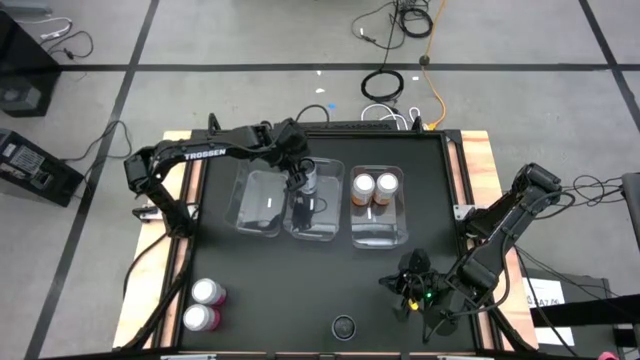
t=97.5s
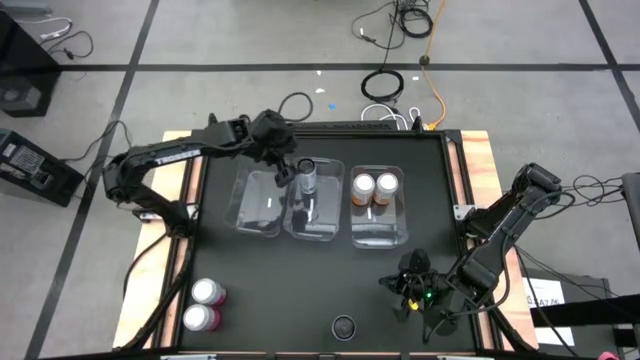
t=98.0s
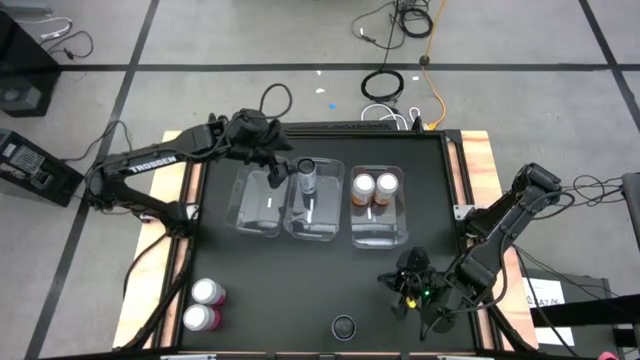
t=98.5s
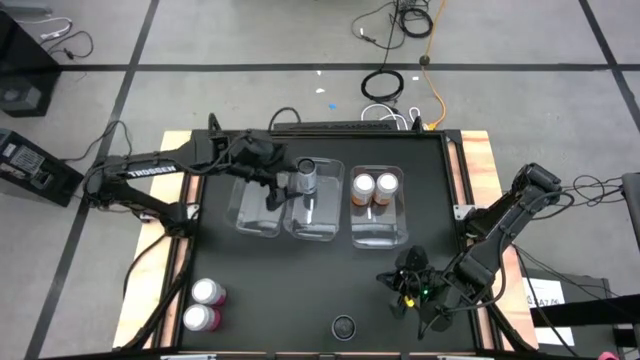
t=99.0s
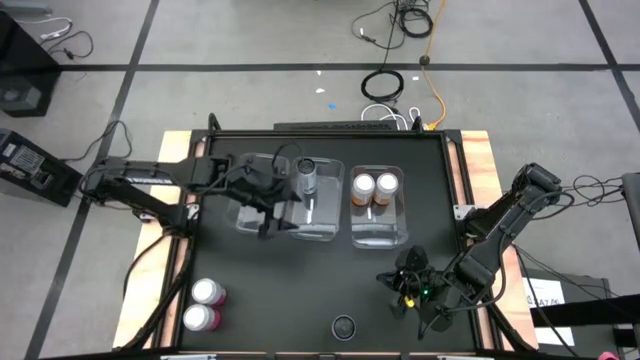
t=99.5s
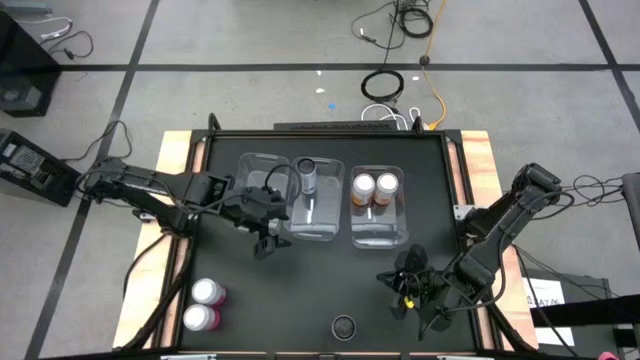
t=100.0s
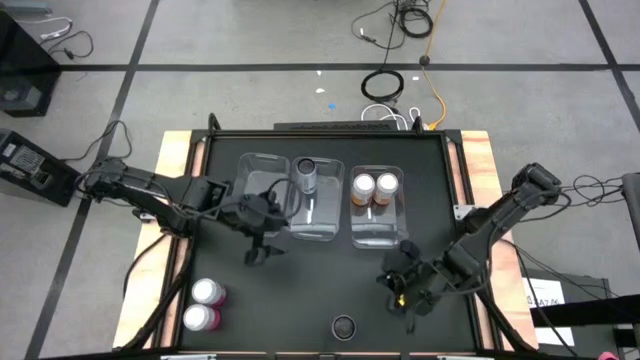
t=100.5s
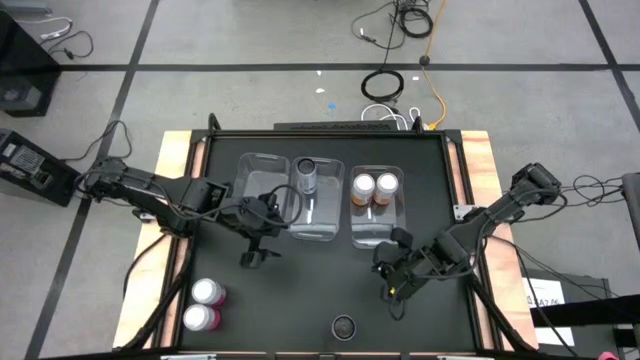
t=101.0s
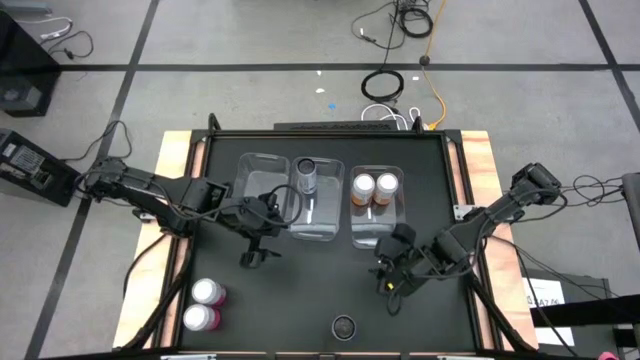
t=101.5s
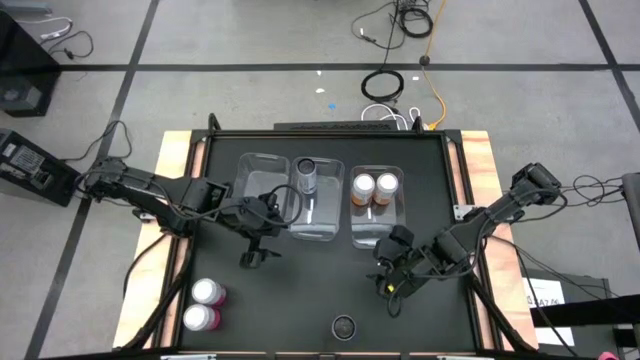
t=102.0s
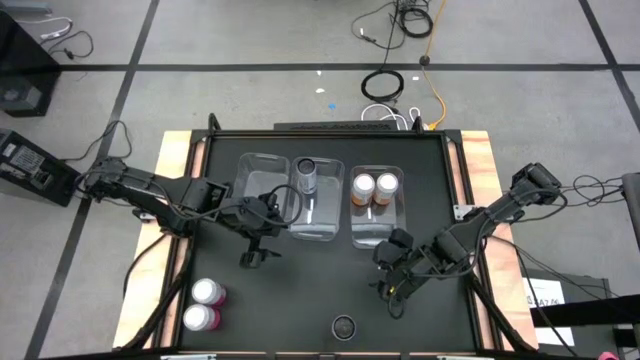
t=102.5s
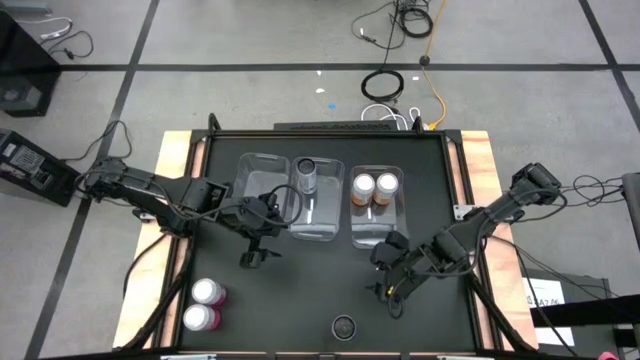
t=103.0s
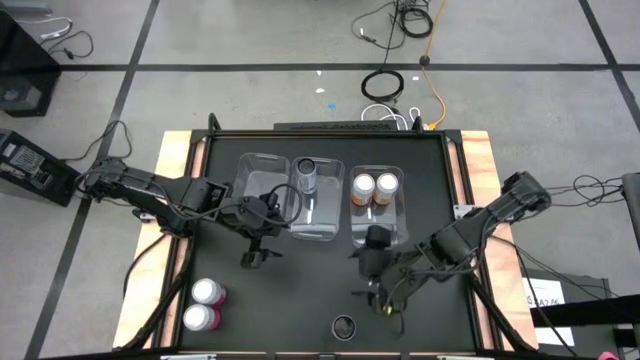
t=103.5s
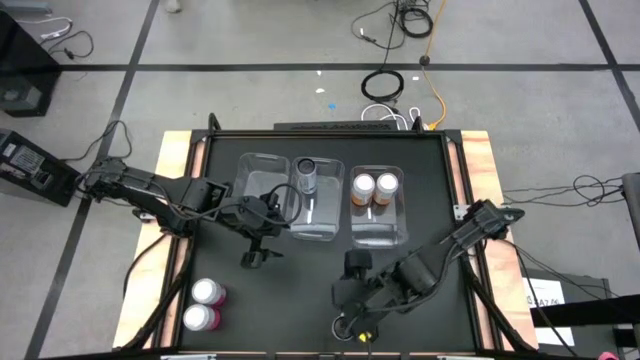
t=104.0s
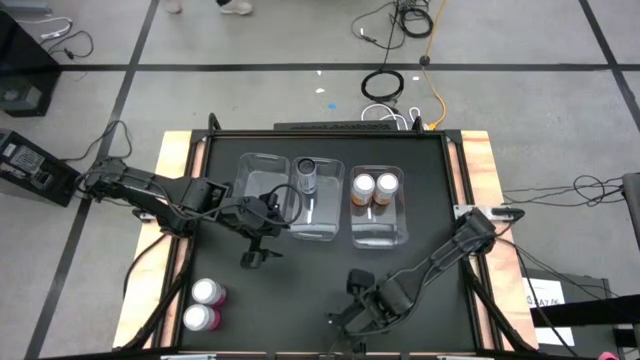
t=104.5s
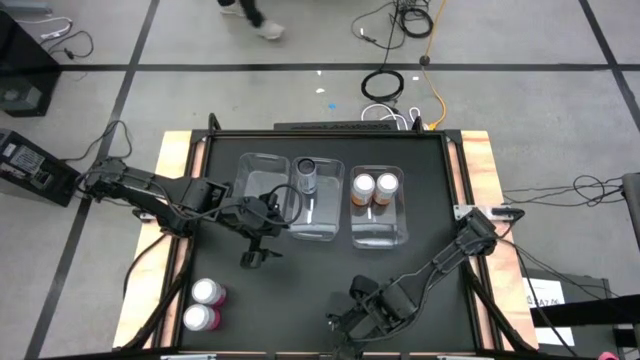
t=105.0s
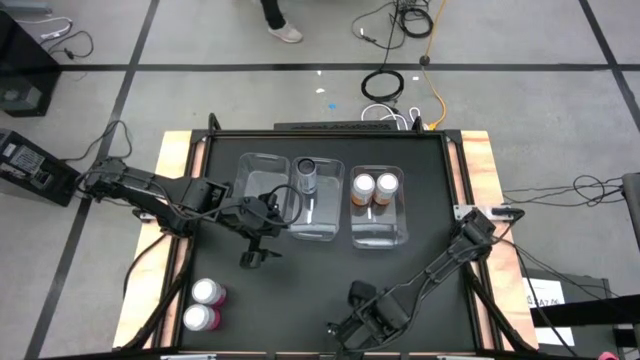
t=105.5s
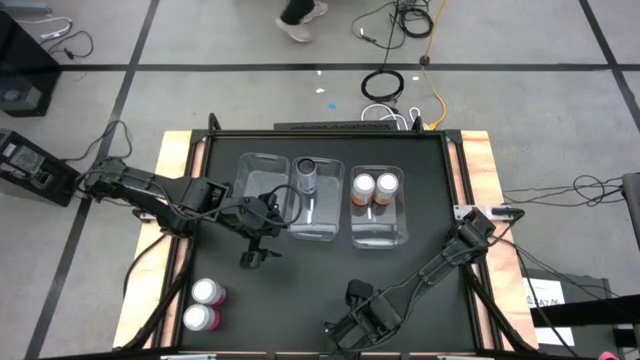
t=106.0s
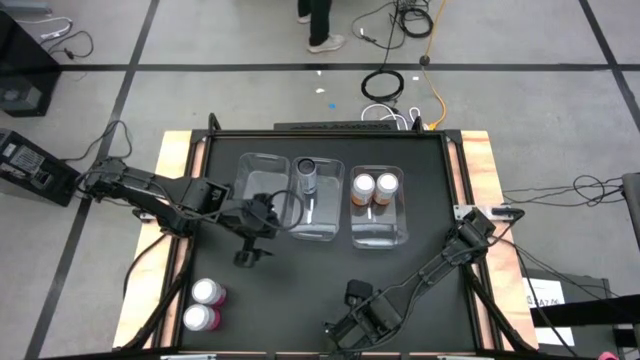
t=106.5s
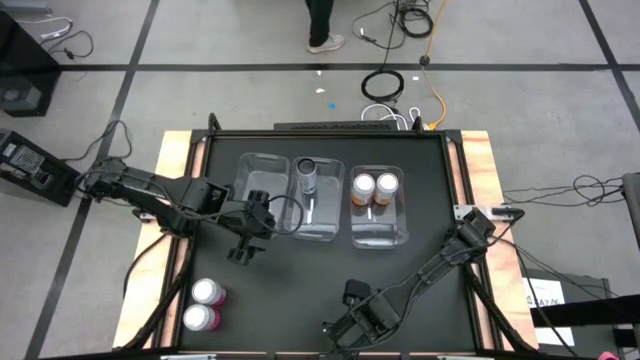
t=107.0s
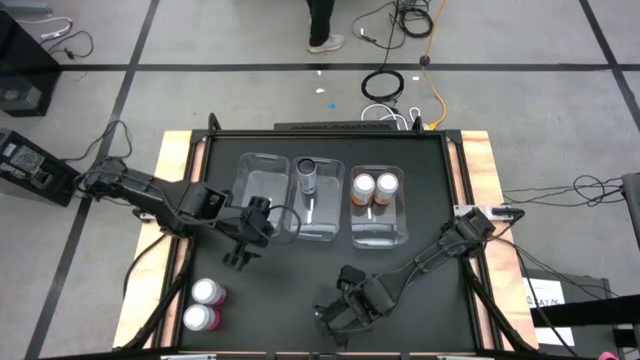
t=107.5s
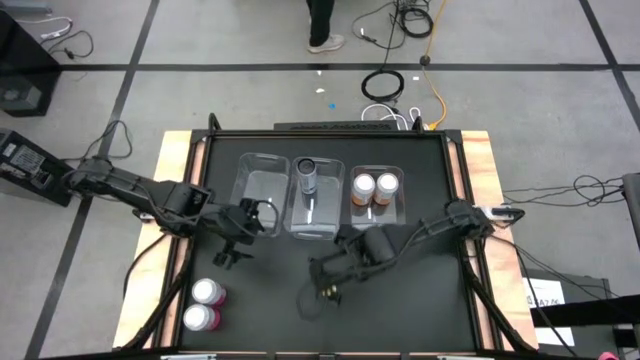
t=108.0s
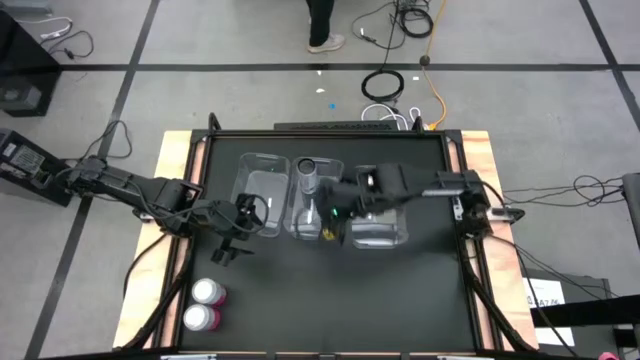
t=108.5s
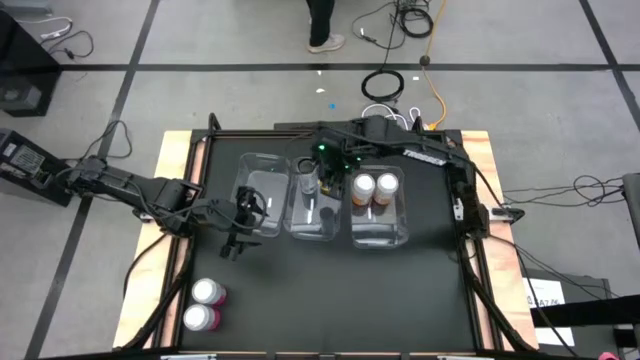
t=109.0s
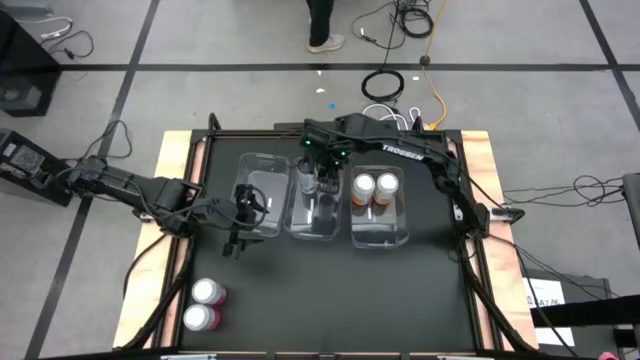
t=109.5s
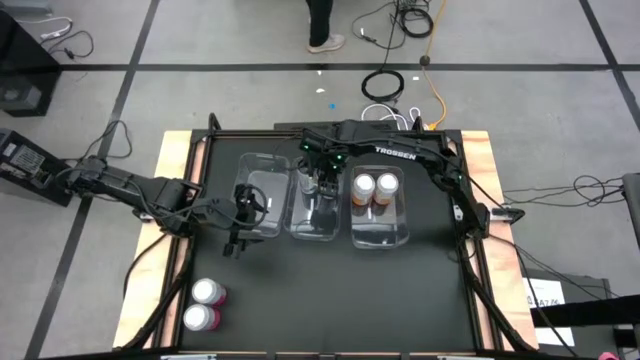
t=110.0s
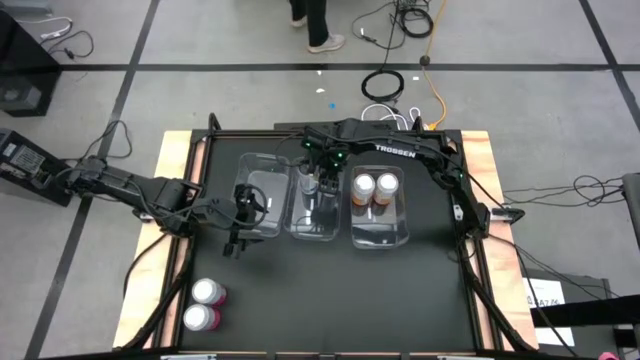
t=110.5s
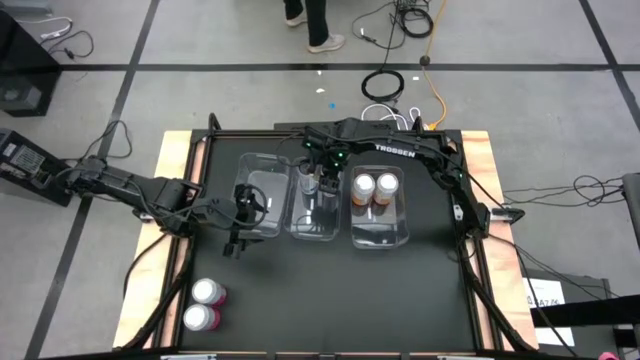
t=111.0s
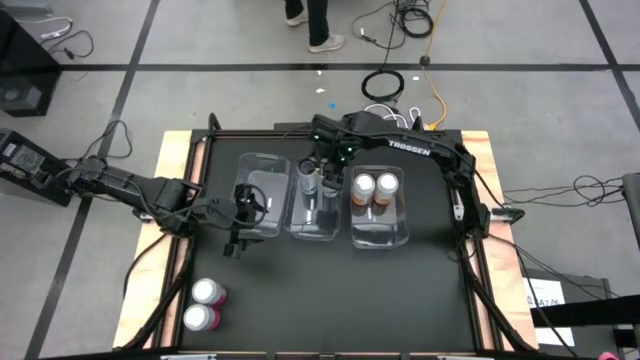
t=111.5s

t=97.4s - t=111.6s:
Task: Sort soda cans
Put the white-blue soda can into the middle transparent bin

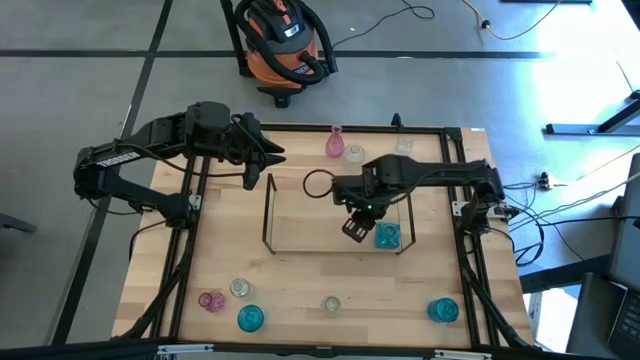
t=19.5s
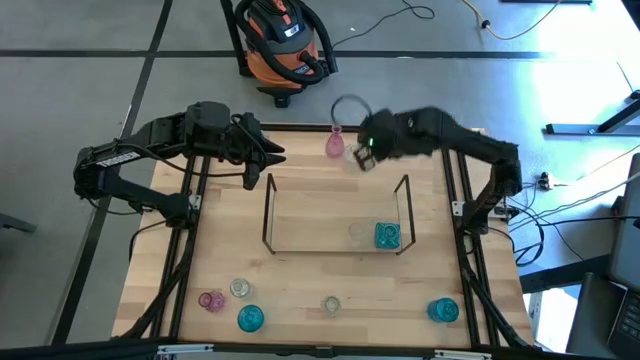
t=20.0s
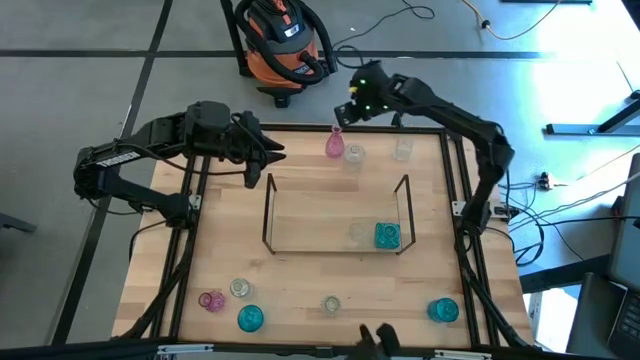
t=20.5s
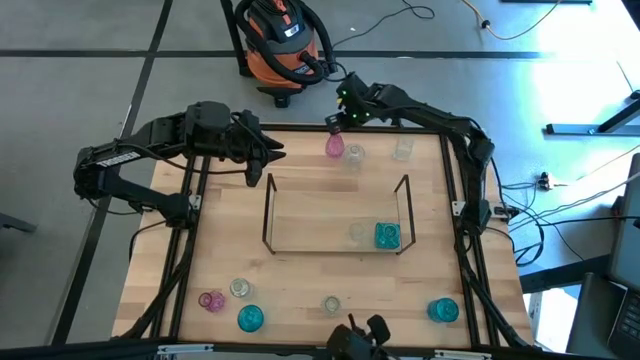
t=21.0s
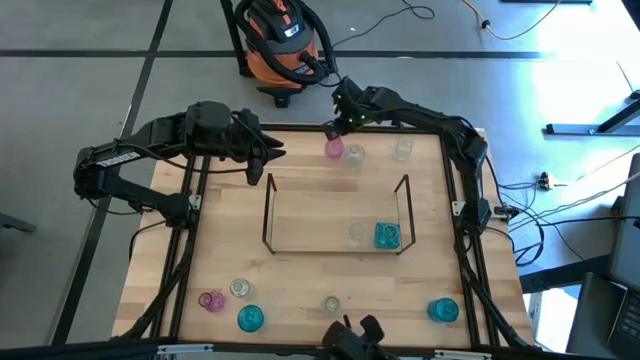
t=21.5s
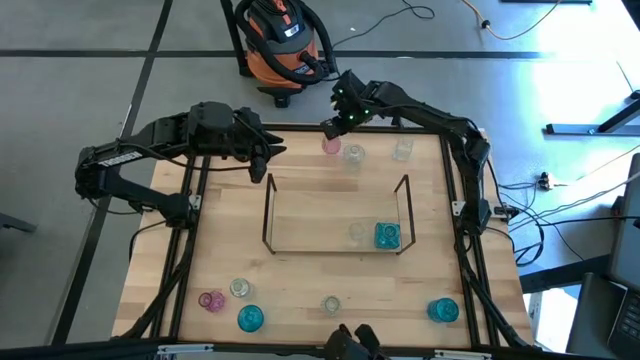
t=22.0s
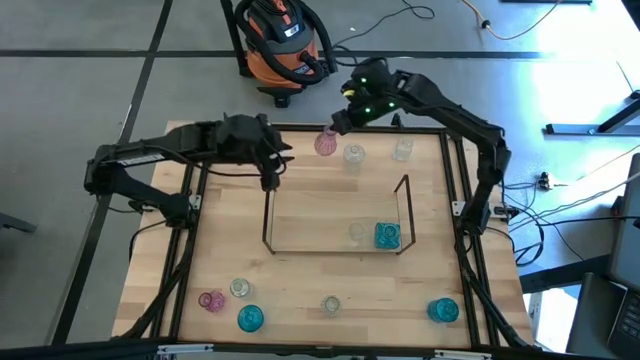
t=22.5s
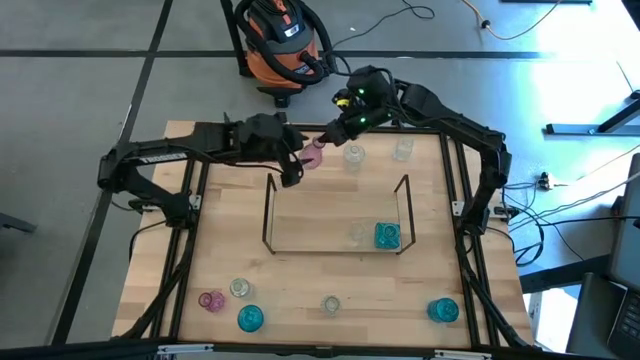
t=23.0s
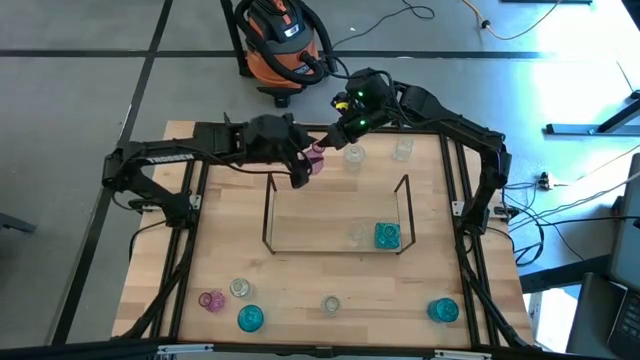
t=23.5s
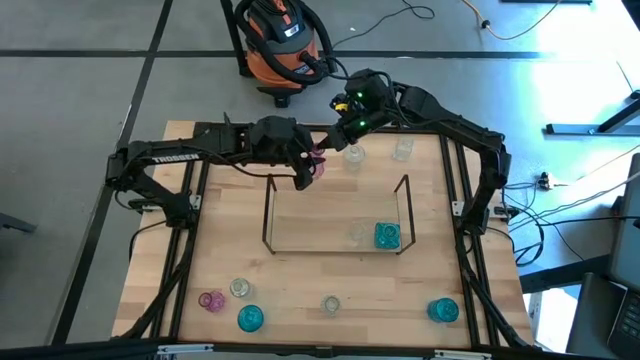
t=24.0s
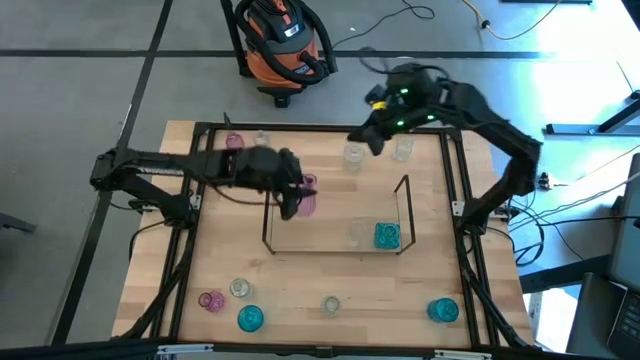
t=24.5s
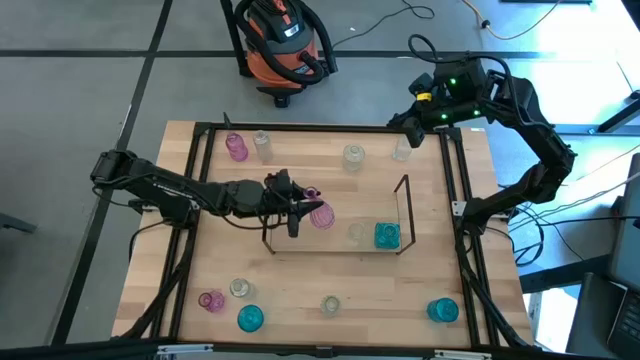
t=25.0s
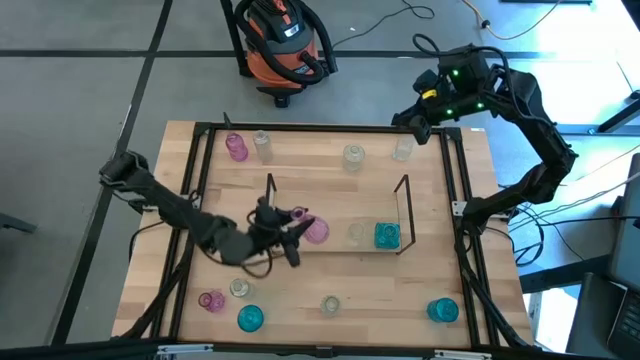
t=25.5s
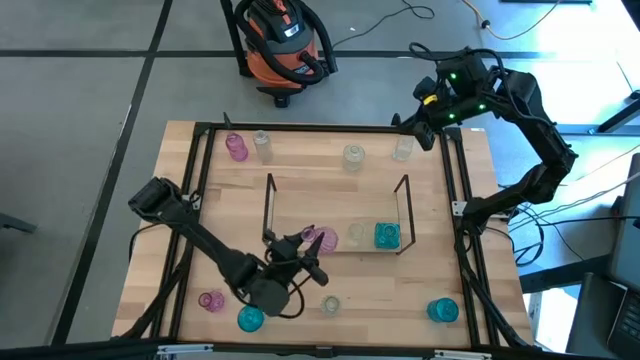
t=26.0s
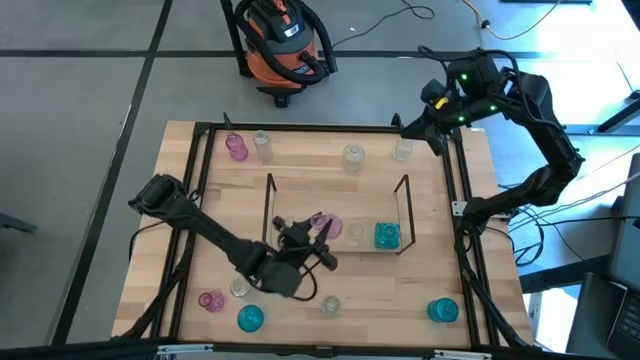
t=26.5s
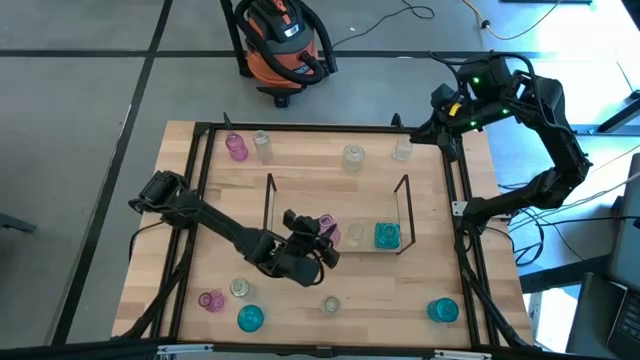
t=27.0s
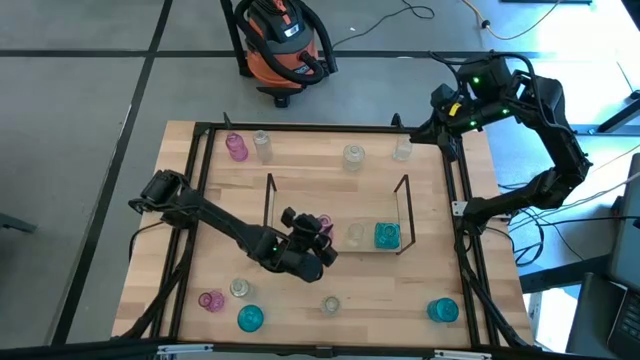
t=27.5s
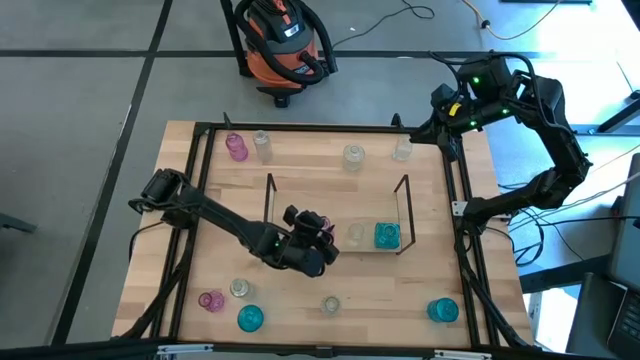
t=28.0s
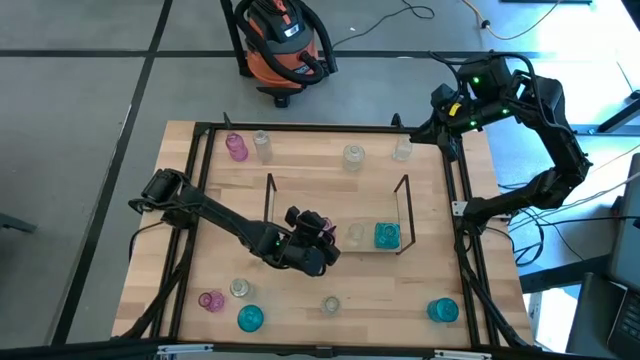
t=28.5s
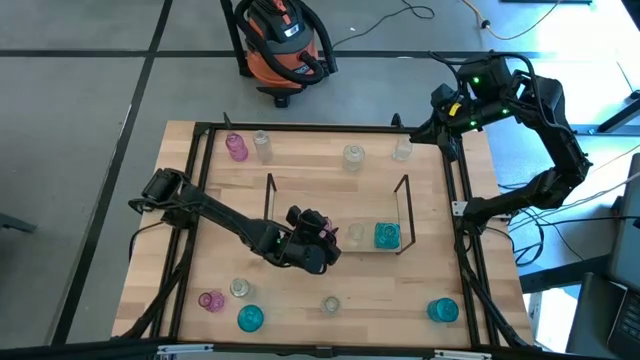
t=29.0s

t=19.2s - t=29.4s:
Task: sort vases onto shelf
Put the violet vase on the shelf
